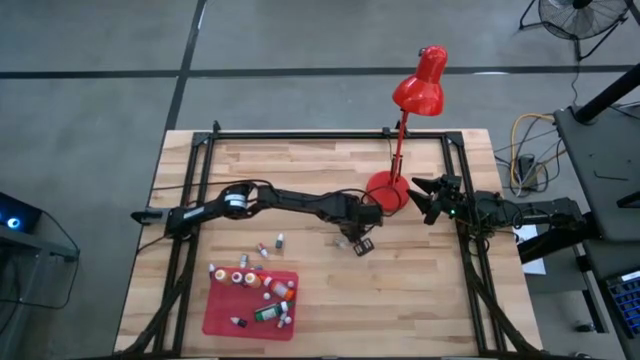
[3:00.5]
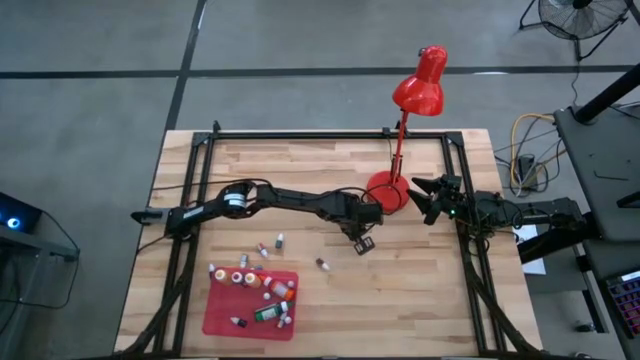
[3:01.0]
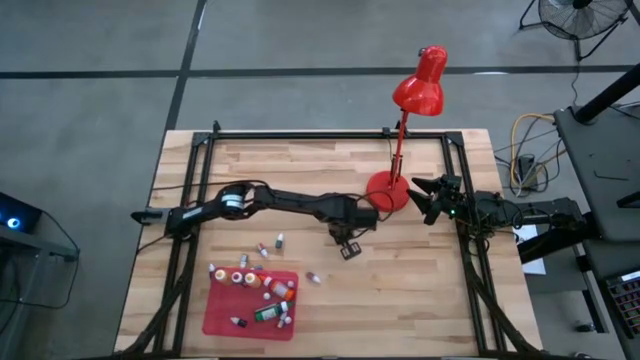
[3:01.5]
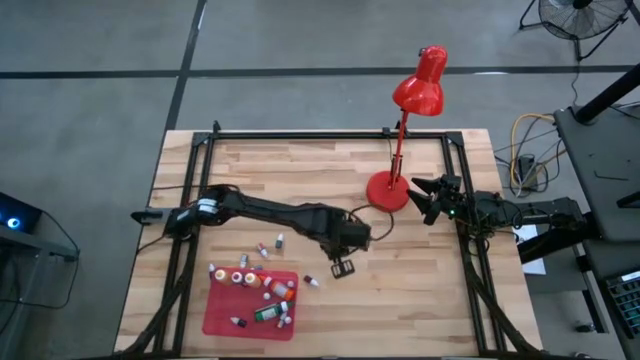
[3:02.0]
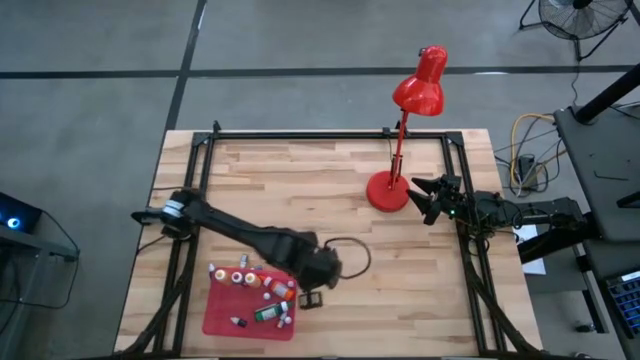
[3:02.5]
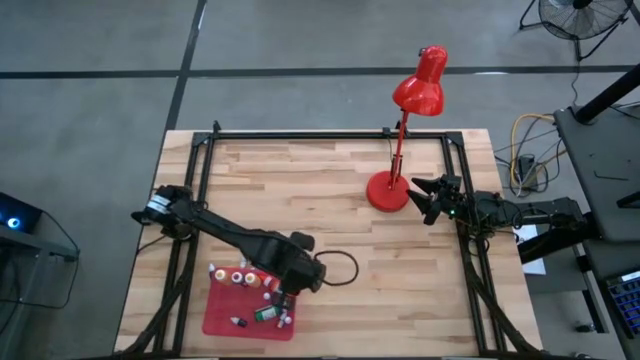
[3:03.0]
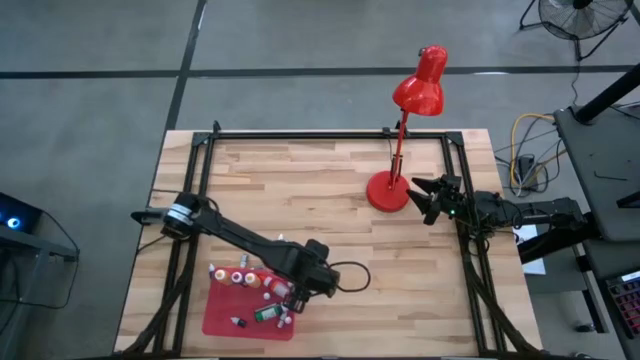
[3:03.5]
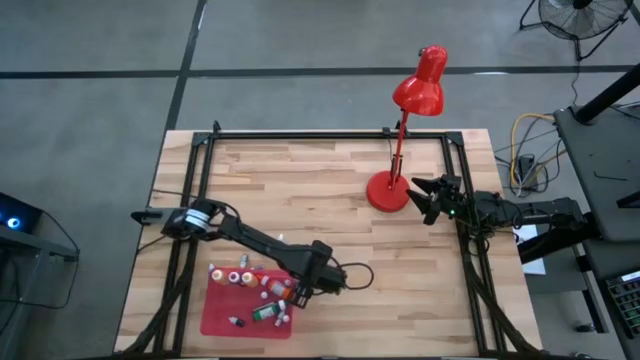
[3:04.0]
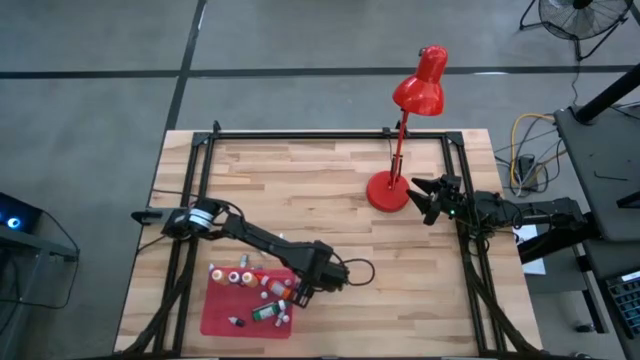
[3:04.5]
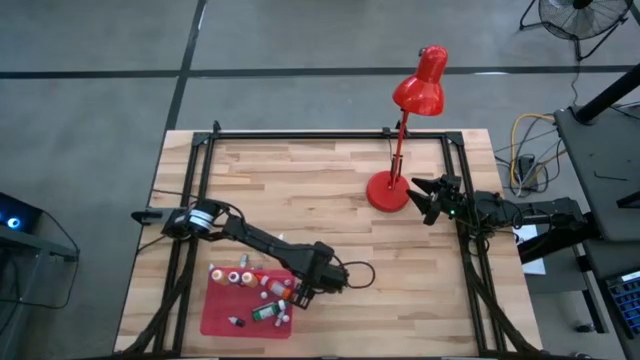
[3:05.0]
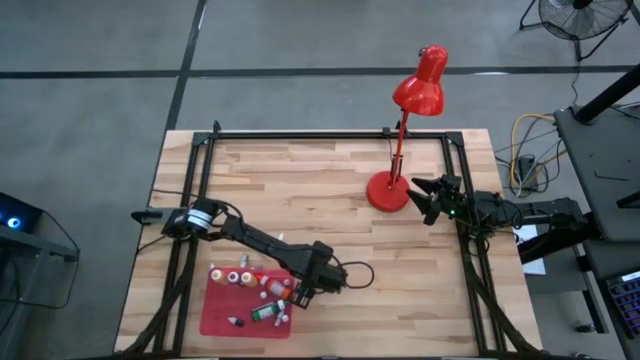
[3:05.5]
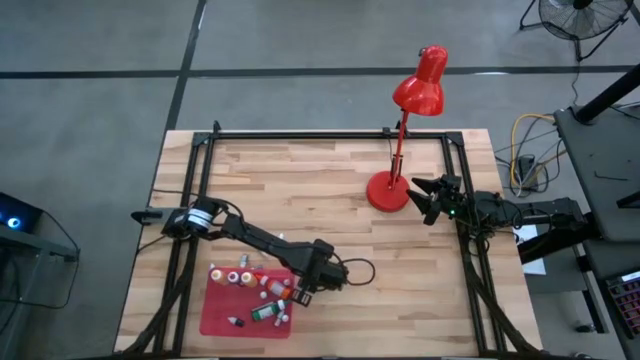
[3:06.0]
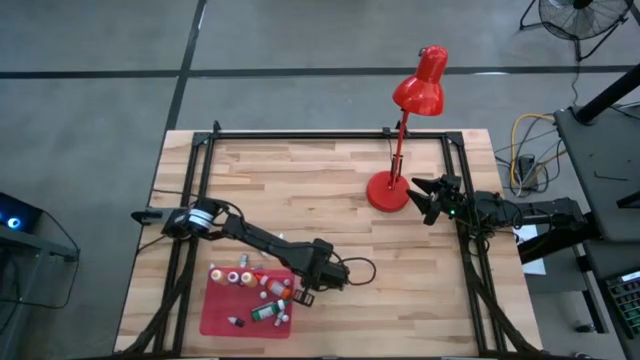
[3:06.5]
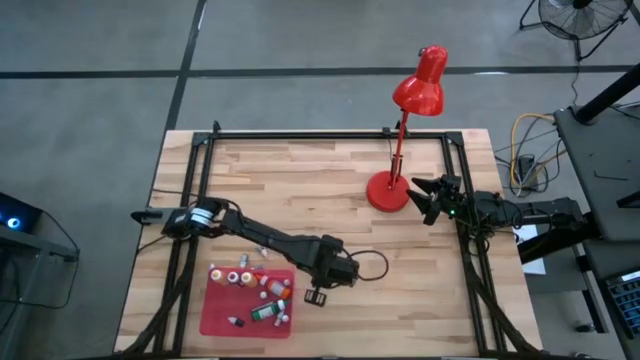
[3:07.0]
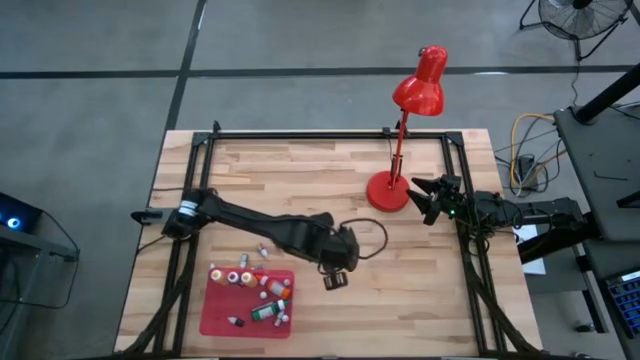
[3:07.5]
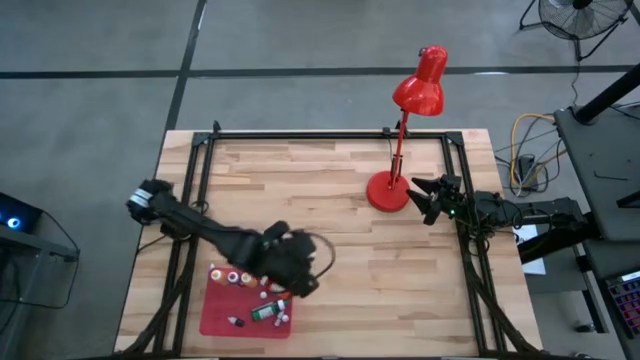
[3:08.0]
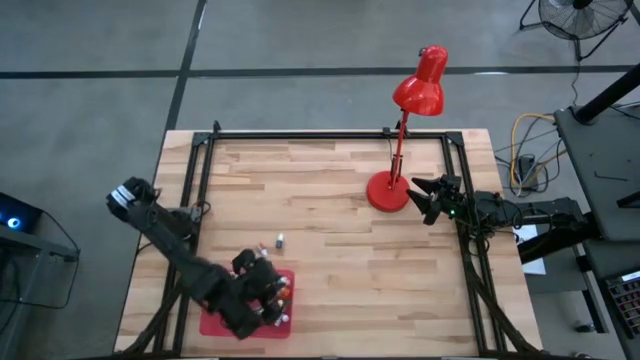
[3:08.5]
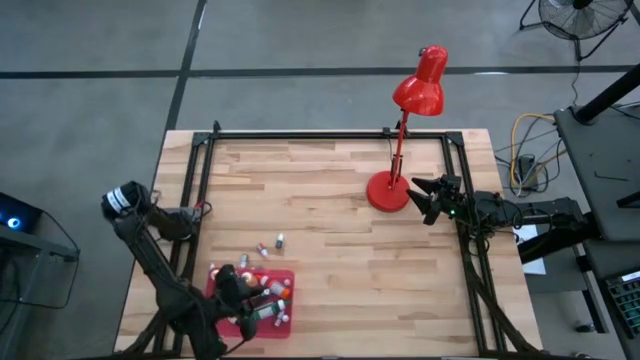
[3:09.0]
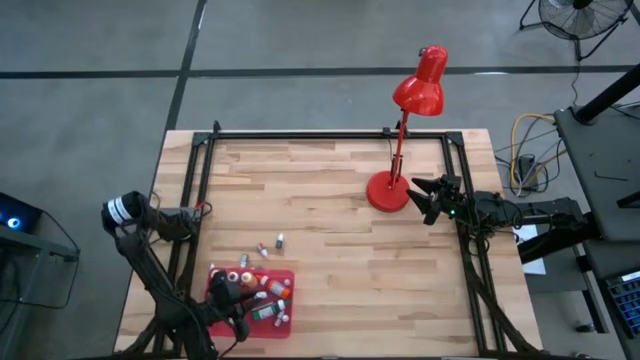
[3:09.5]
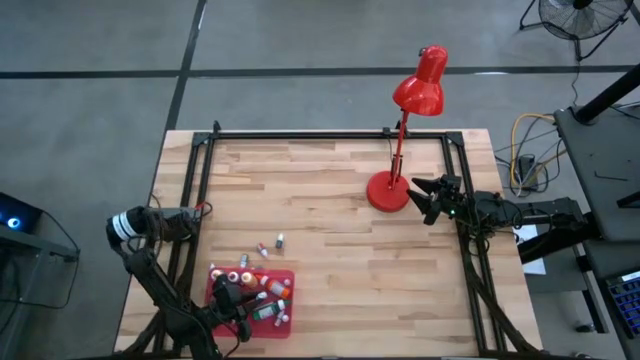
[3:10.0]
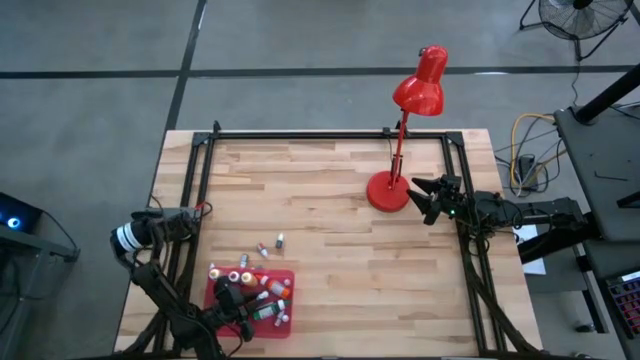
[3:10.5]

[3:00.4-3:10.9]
Task: Pick & Place food coloring
Put the small pink food coloring bottle into the red bin

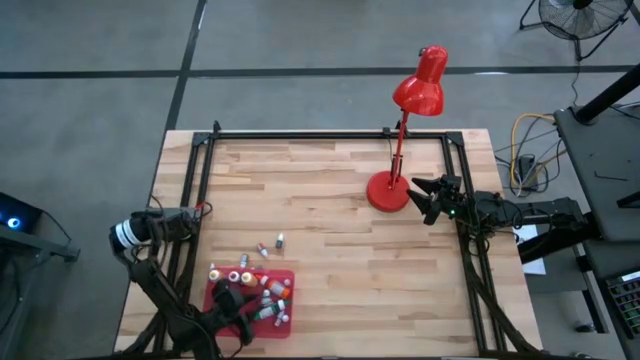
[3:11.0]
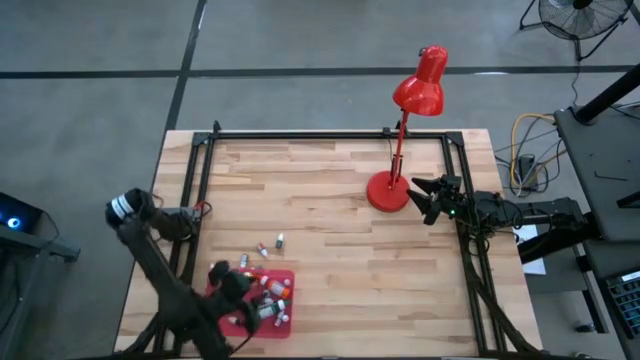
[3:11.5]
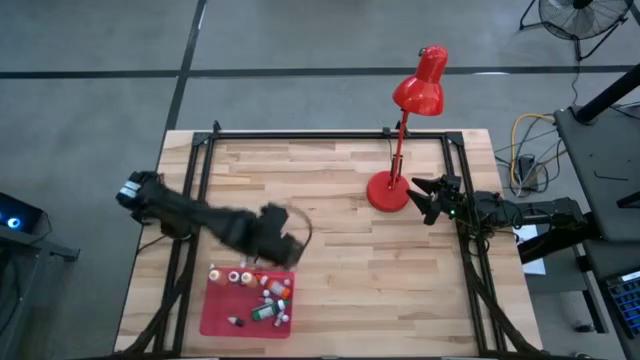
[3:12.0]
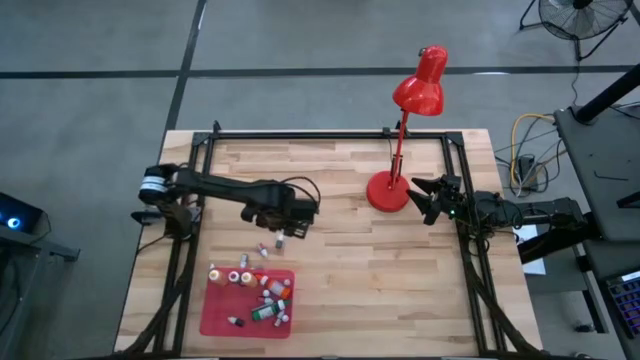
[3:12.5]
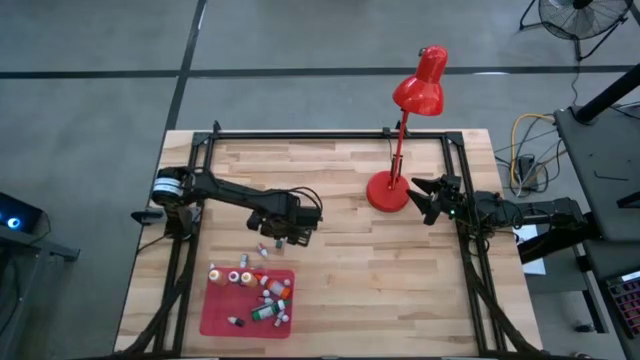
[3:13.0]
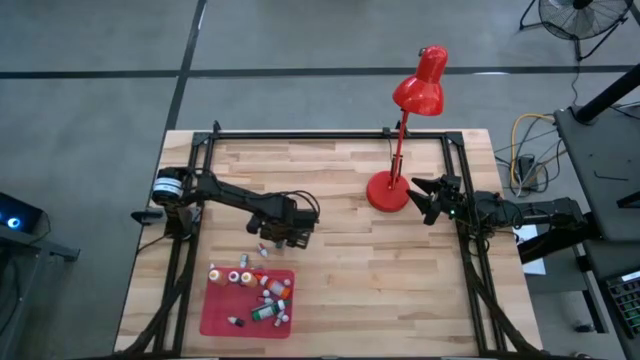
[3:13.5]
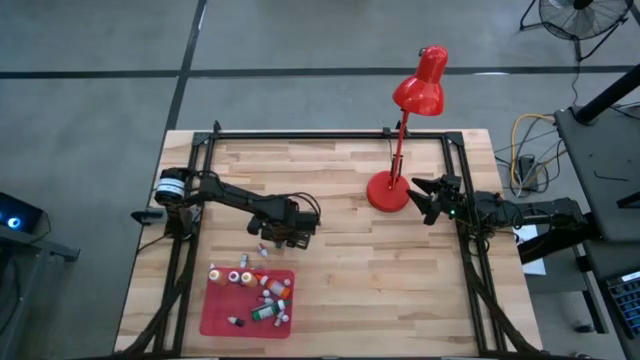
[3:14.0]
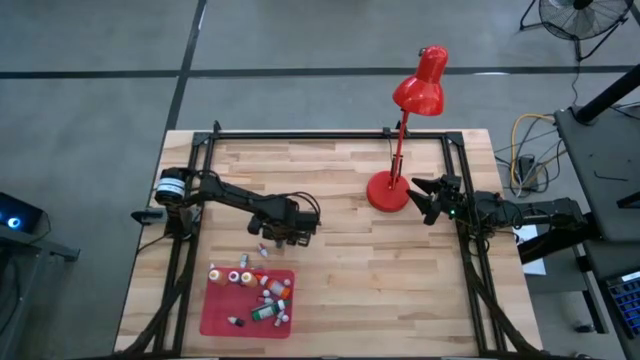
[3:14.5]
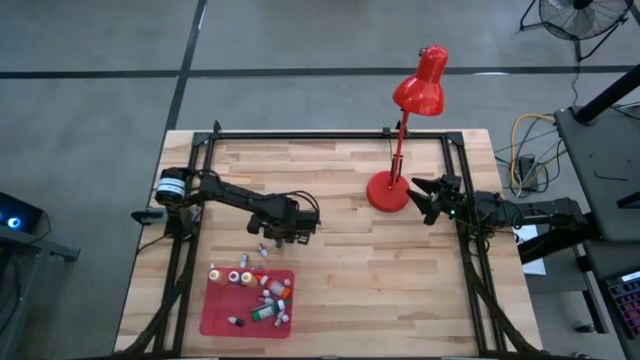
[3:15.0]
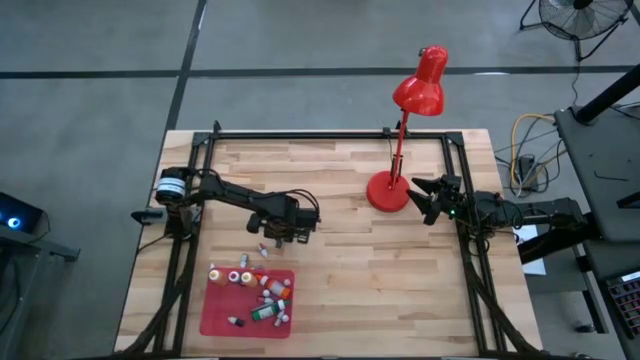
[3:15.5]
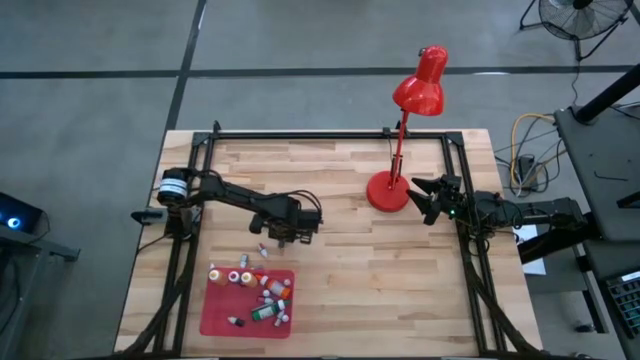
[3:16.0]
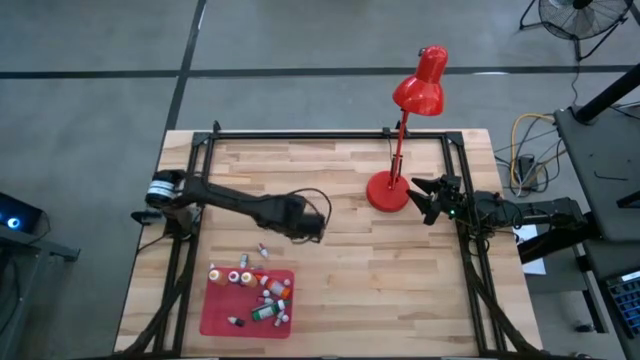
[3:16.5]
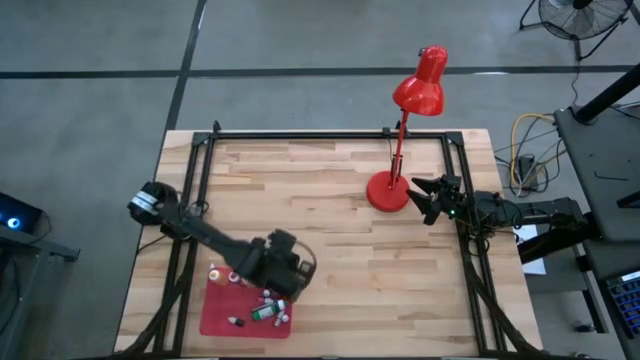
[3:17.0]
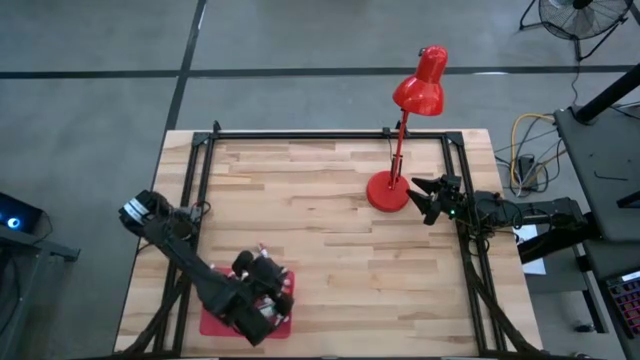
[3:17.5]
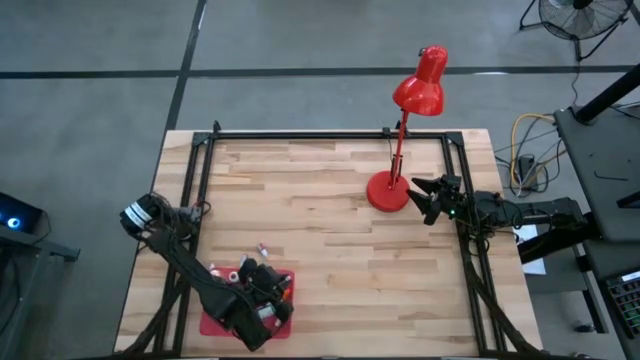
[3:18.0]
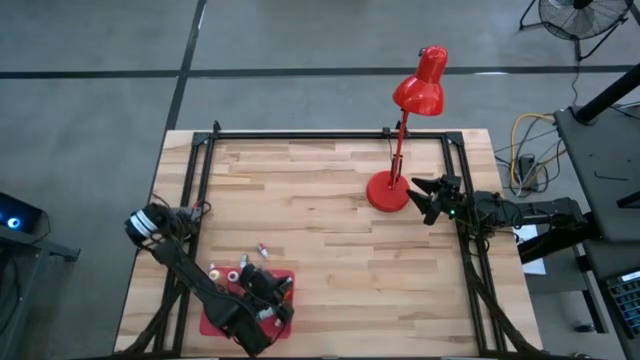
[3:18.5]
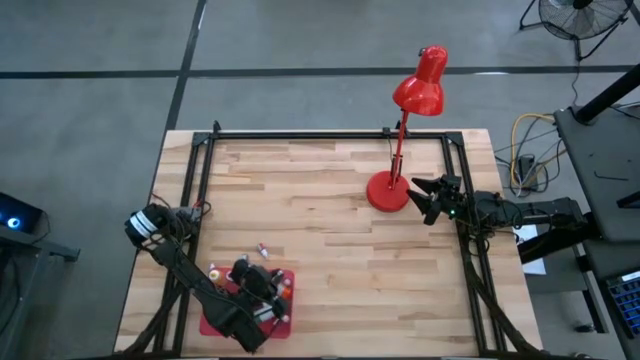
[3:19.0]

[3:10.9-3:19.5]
Put the small green food coloring bottle into the red bin

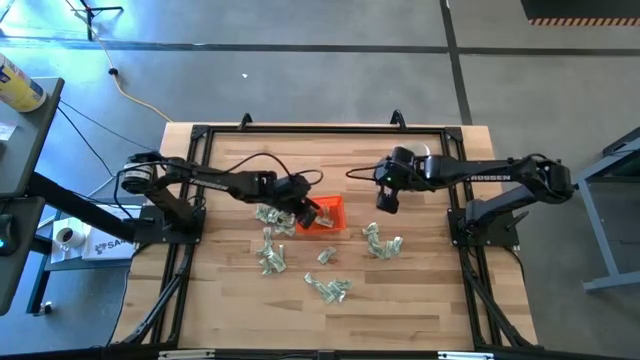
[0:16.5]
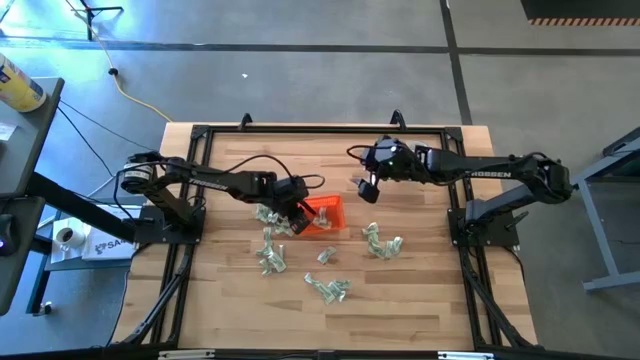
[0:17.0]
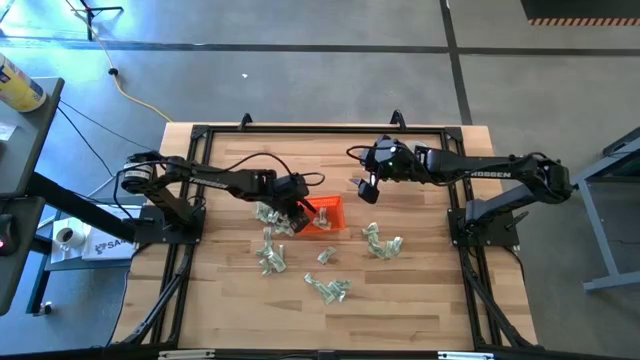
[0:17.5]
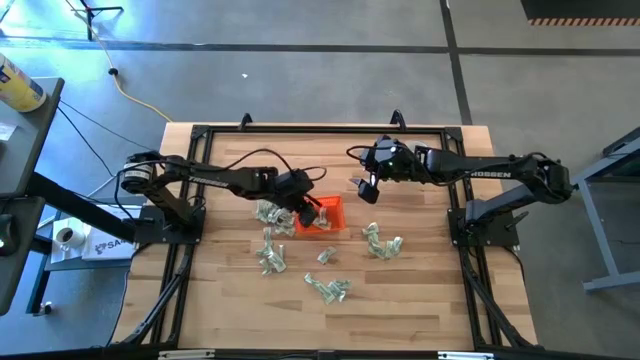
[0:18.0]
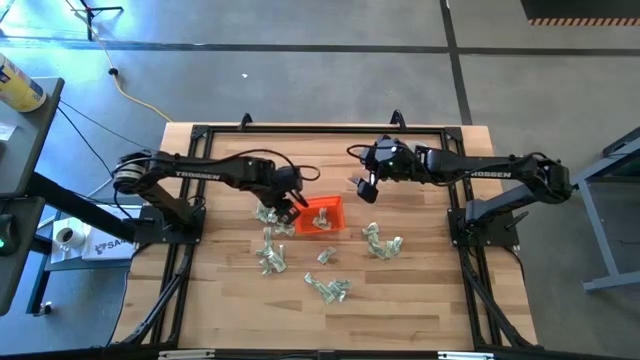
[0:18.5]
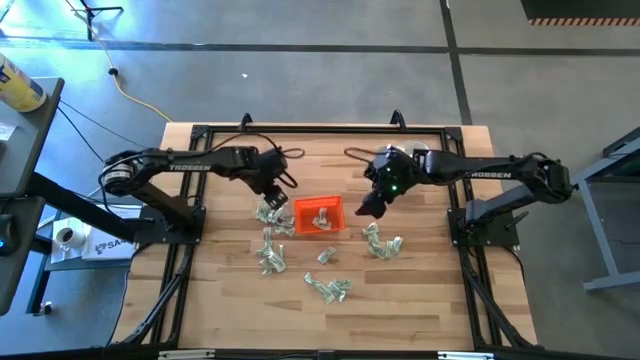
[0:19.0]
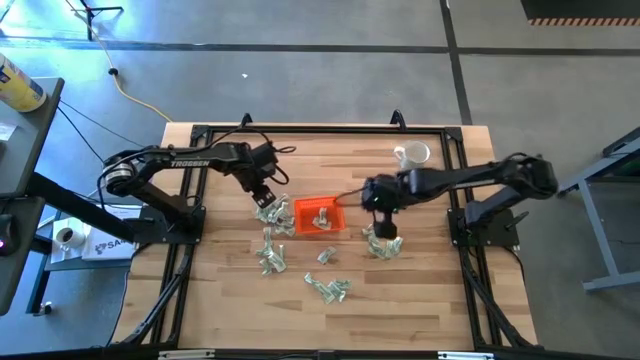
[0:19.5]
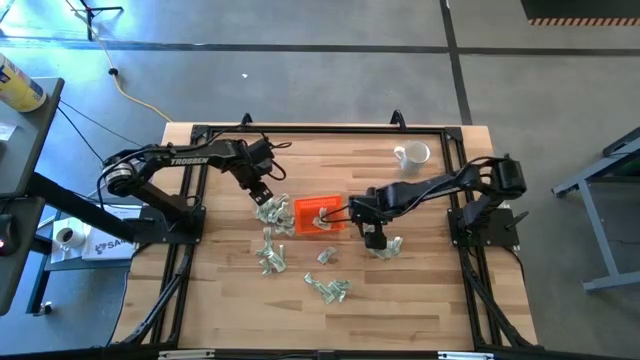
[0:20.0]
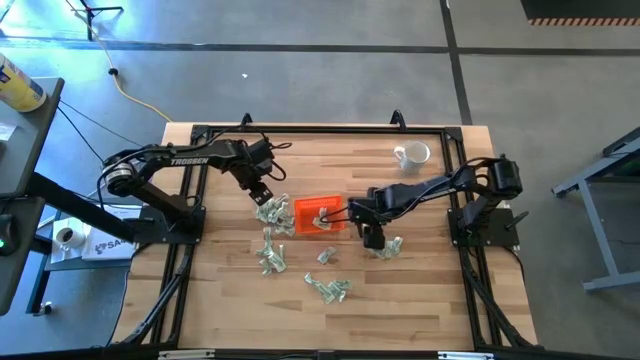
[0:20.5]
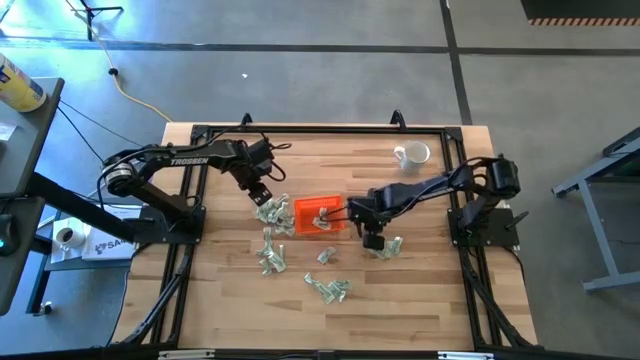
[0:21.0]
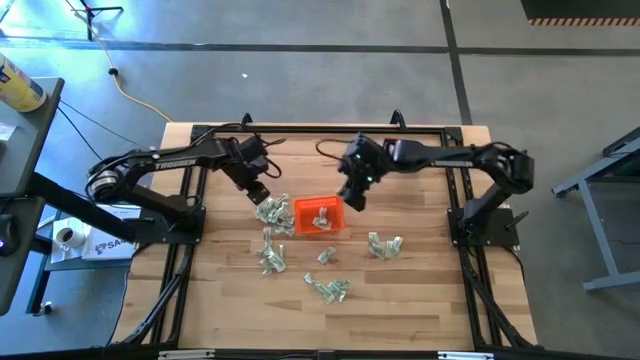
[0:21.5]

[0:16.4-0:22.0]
Task: Pick and place Stevia / Truvia into bins
Put the stevia packet into the orange bin
